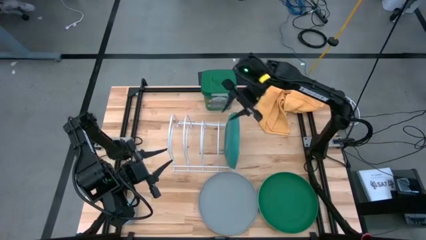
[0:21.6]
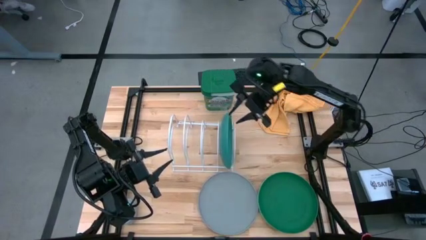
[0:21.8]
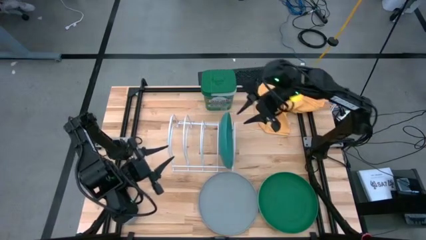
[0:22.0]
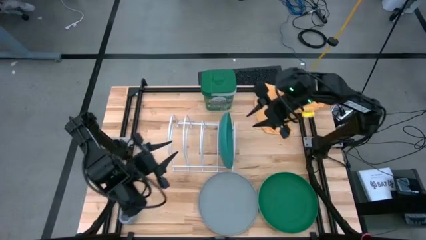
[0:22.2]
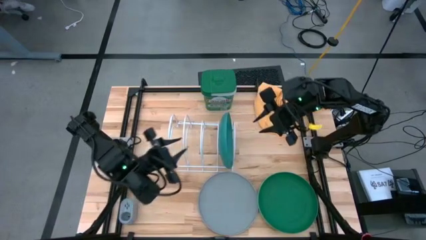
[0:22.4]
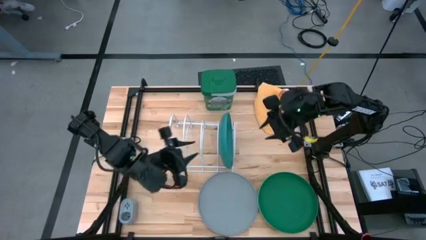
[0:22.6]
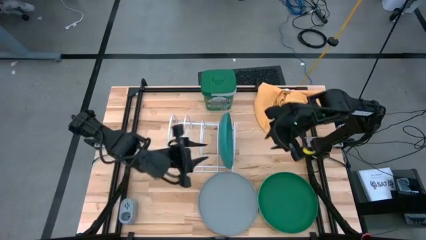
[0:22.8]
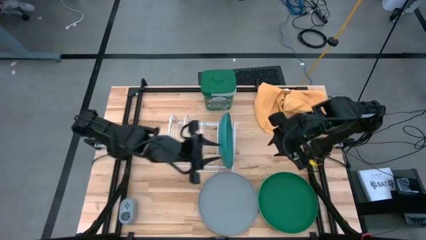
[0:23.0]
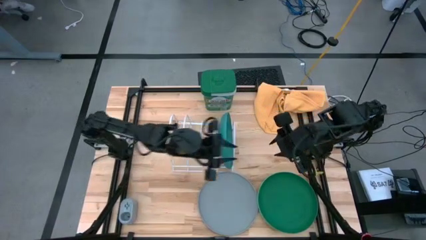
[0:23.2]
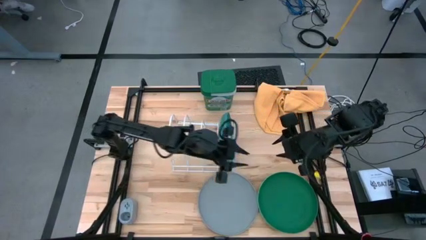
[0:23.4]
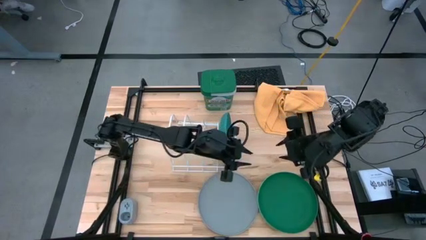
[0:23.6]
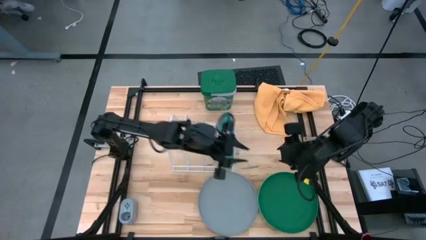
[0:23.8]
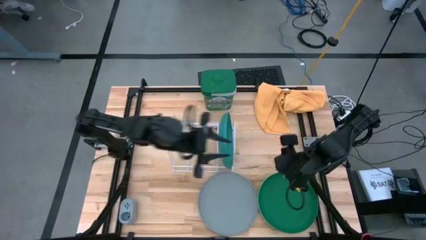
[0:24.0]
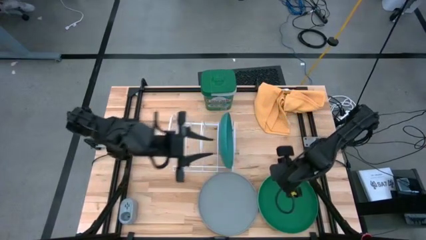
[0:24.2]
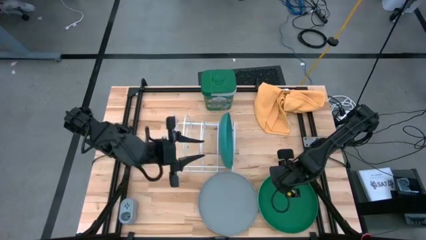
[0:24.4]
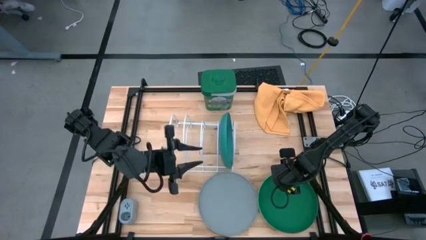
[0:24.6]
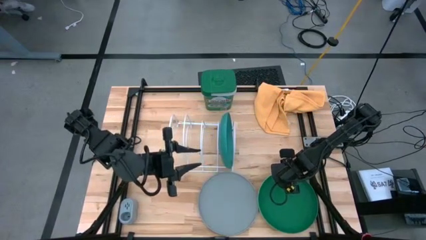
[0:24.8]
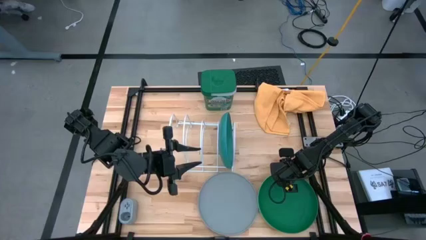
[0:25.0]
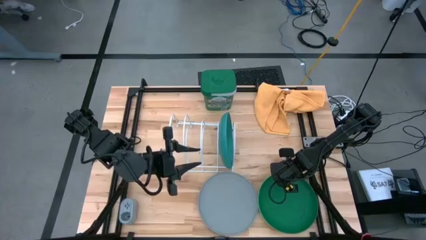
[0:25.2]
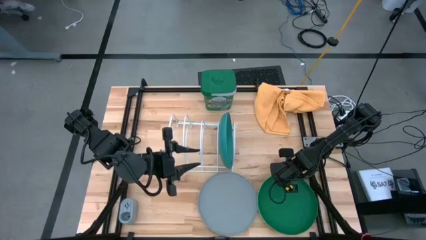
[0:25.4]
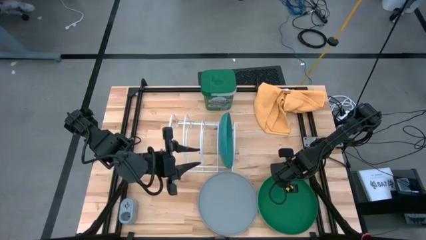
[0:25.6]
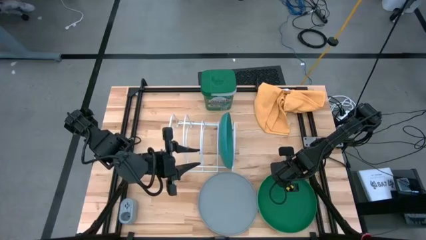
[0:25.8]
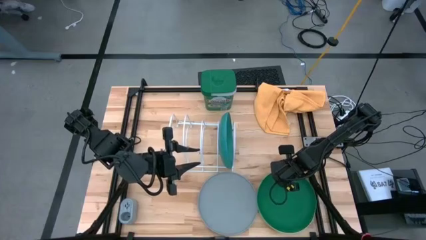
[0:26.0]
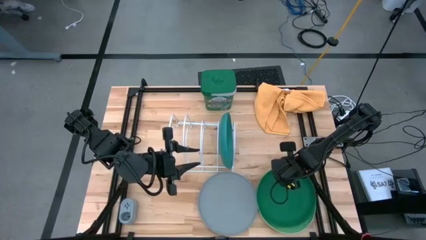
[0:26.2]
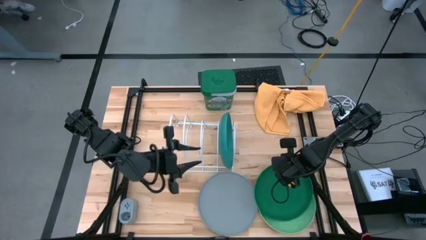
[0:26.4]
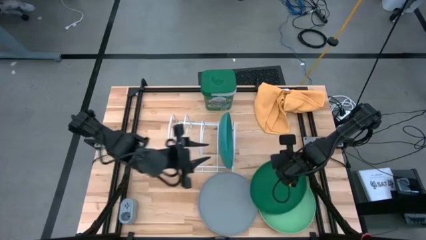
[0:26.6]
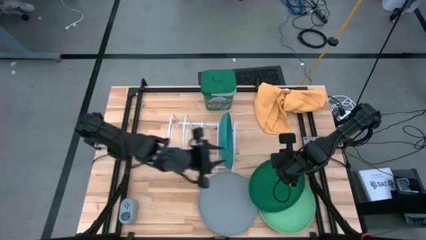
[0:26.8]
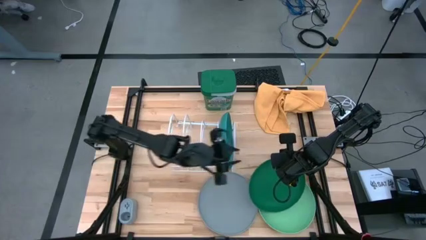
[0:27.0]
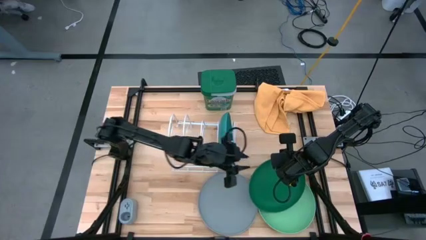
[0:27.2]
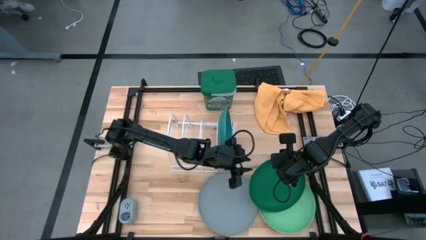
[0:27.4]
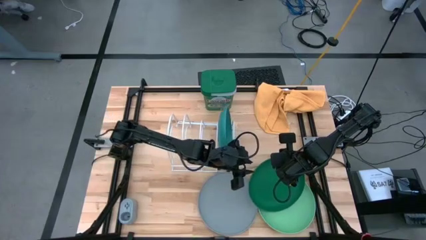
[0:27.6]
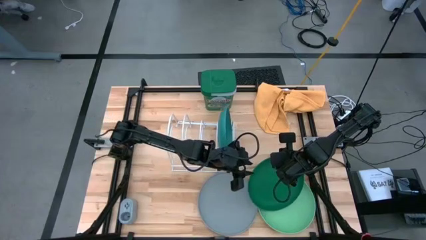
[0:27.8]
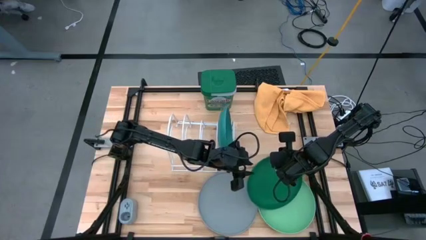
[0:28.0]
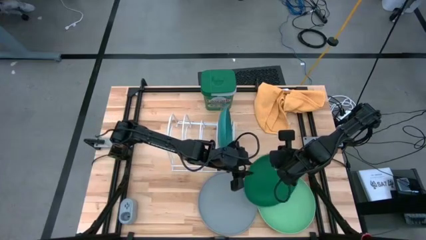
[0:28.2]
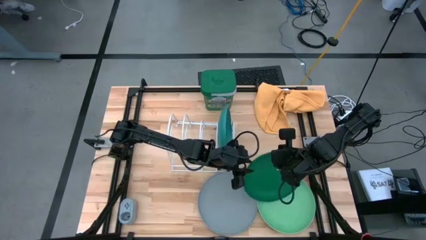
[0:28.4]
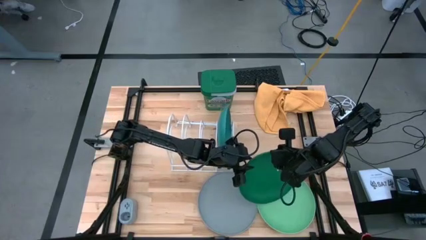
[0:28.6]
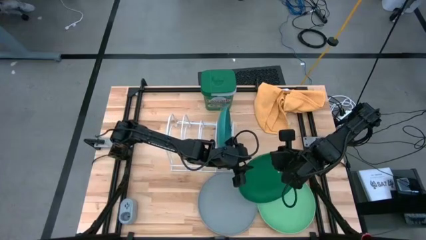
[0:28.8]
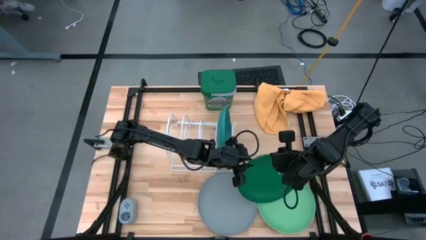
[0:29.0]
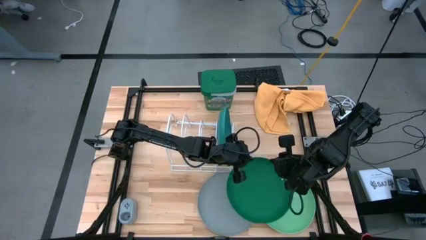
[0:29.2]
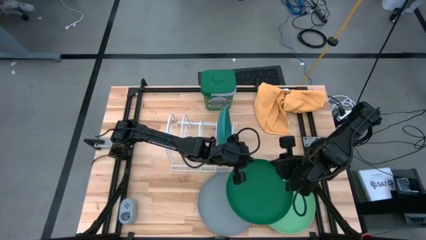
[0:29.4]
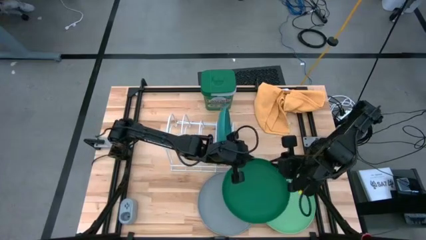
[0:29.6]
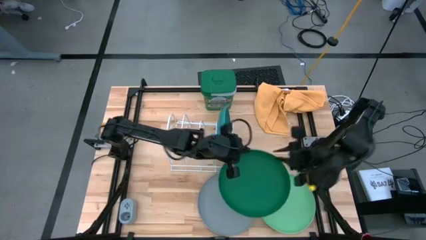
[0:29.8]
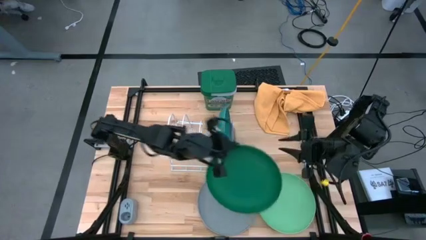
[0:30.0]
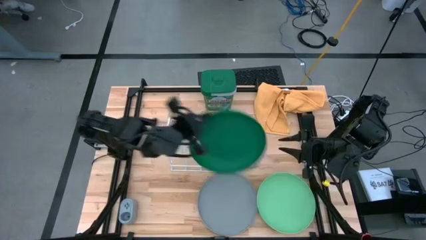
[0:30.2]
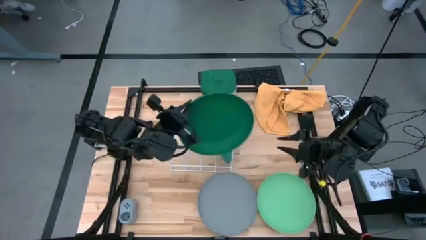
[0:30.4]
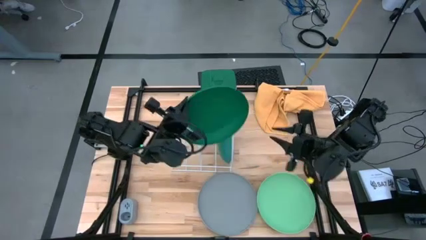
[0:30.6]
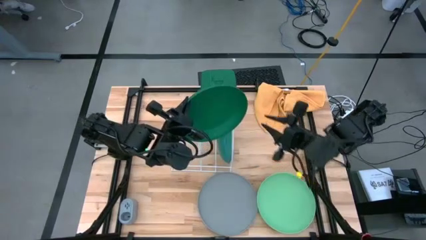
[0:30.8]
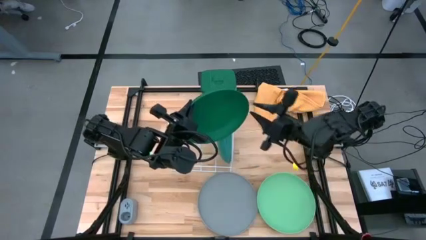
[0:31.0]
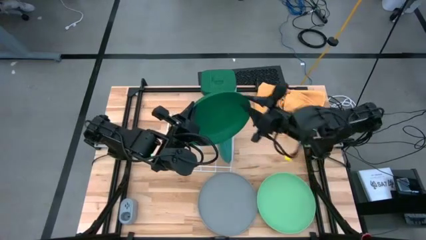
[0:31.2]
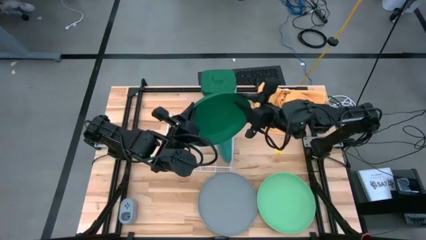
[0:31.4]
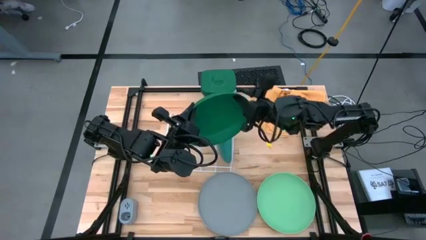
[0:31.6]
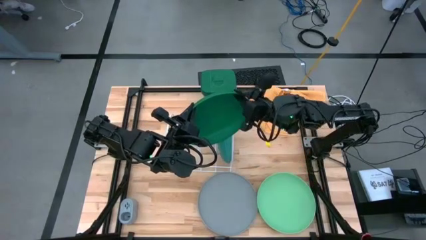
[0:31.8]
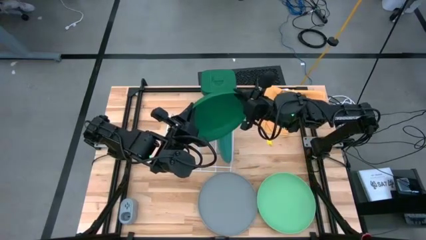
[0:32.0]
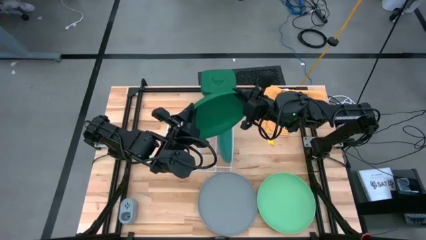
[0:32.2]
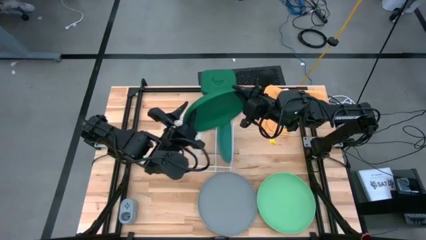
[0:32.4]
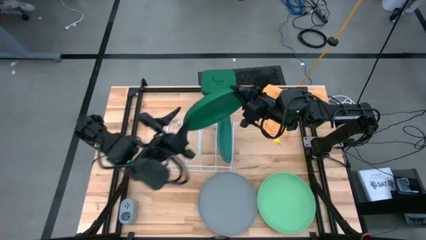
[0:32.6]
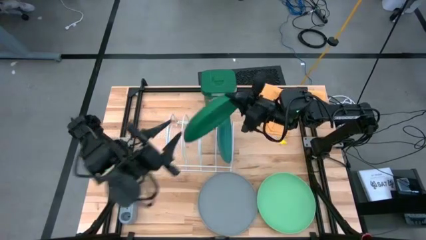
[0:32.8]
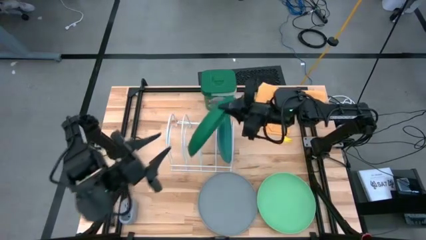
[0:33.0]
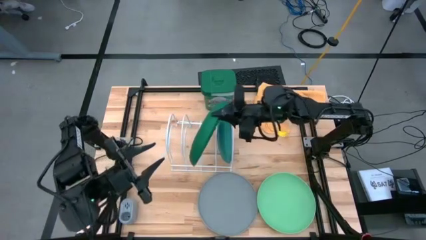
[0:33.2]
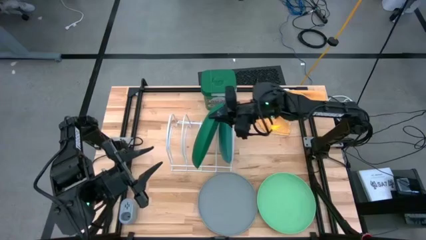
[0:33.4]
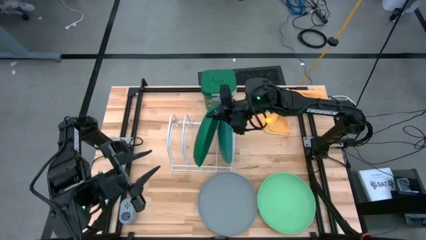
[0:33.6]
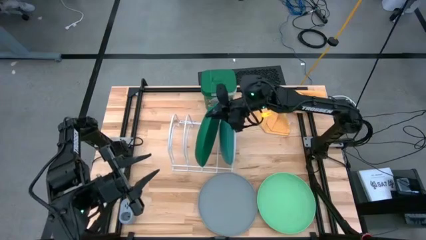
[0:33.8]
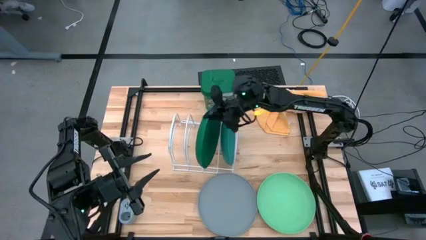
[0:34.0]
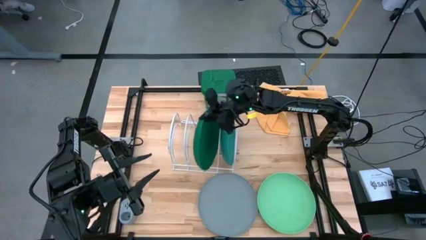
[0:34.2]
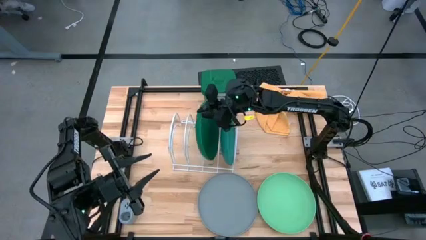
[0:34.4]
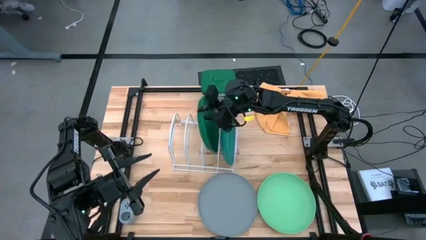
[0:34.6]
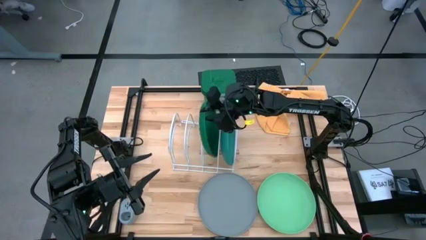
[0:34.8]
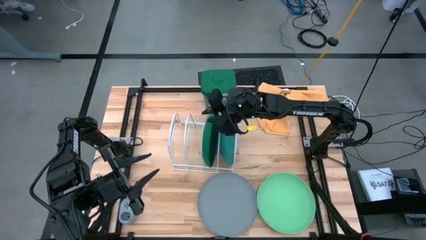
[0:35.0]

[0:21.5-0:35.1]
Task: Sort dishes
Put the dark green plate into the dish rack

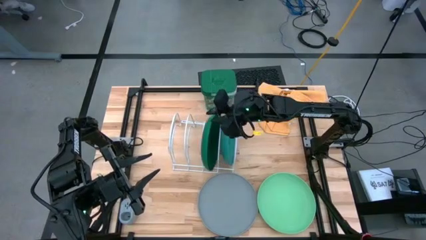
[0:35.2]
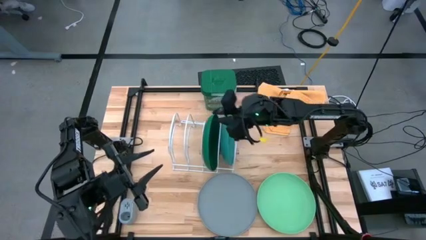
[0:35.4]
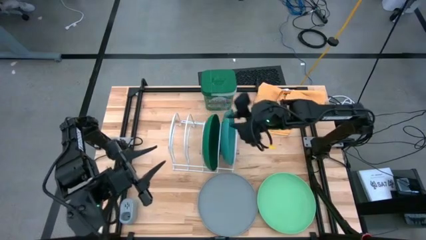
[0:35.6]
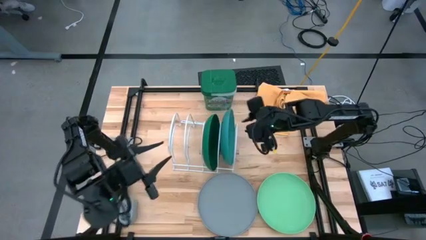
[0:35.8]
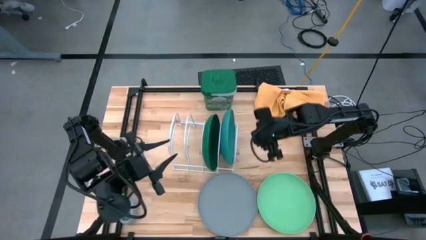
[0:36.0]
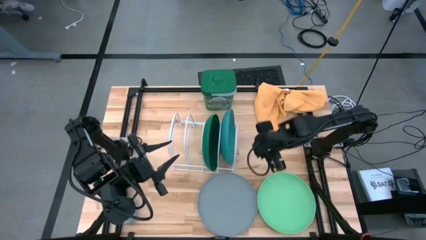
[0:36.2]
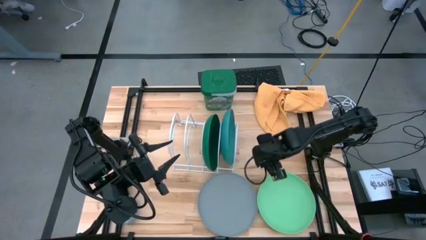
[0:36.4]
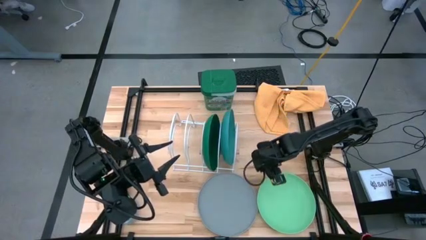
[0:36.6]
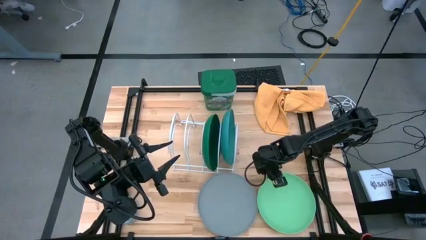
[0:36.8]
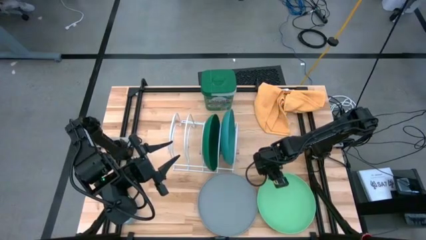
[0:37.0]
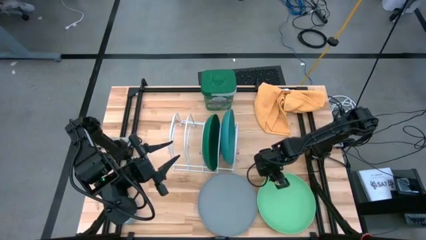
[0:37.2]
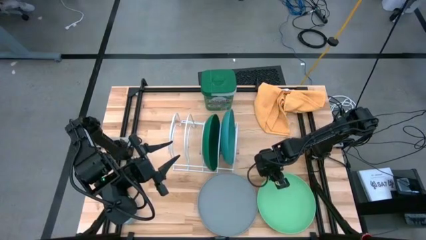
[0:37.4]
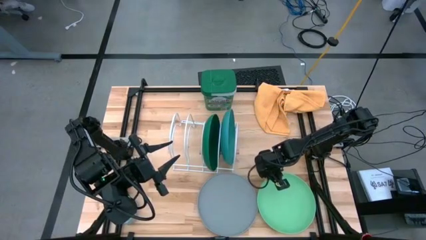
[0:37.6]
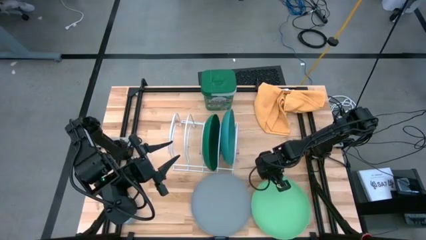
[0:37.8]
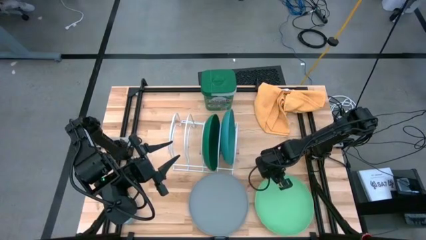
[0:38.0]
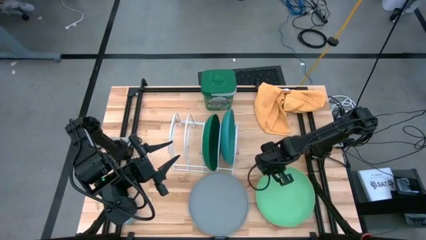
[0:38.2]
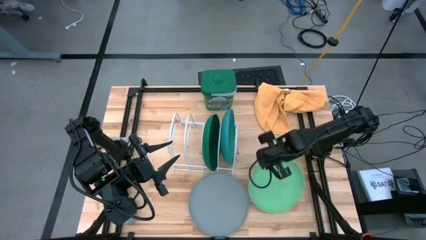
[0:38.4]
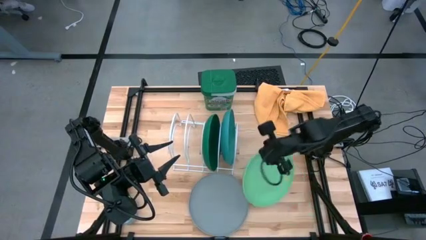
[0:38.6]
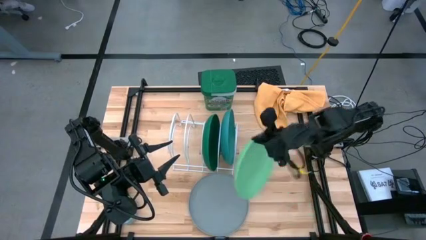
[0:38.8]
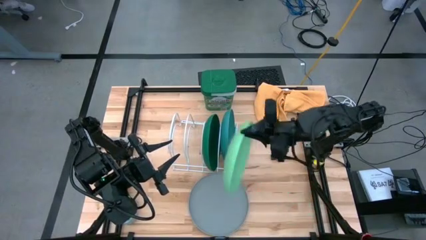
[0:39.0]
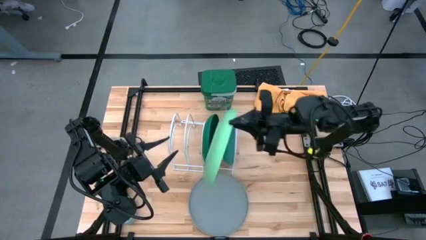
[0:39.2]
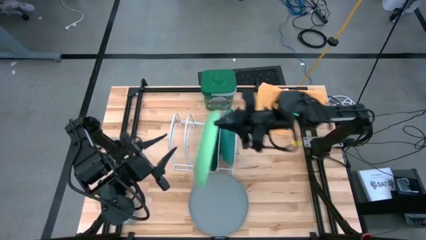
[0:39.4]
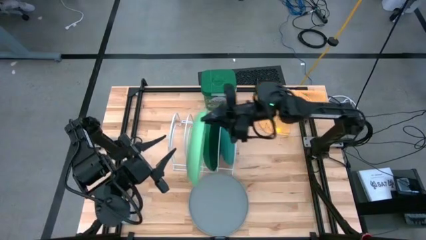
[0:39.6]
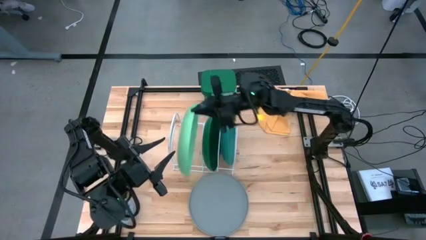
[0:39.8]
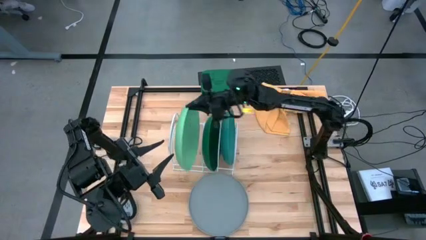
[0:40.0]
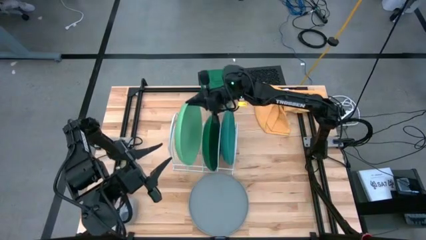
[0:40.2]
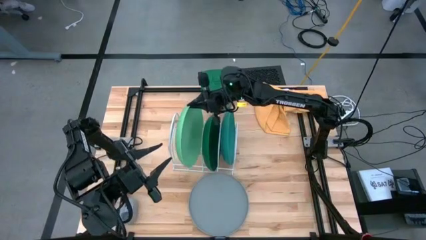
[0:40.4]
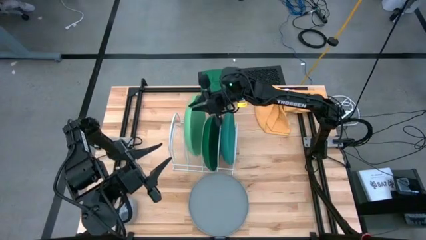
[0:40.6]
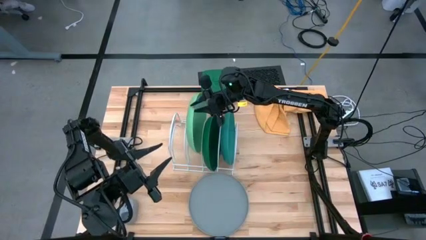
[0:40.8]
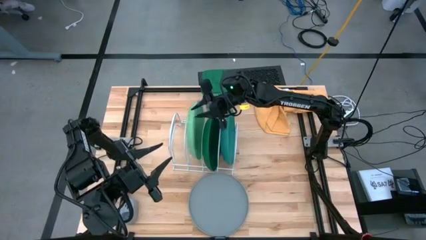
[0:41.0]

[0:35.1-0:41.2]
Put the light green plate into the dish rack
